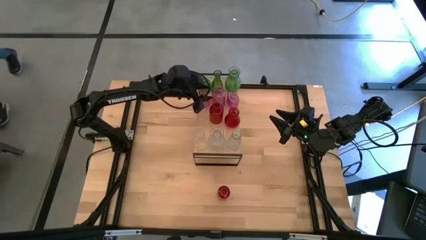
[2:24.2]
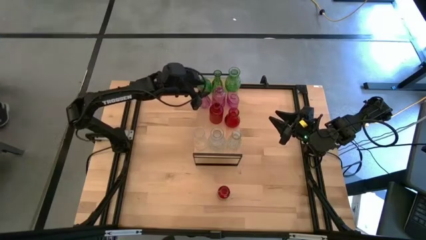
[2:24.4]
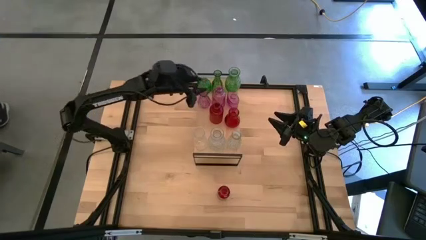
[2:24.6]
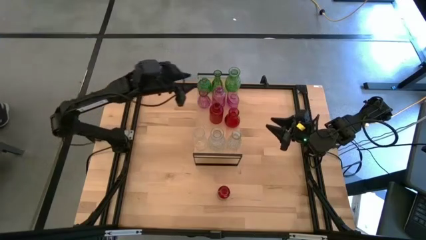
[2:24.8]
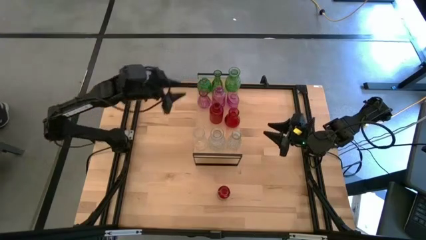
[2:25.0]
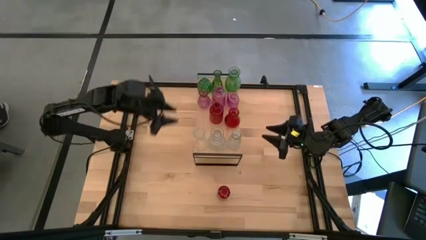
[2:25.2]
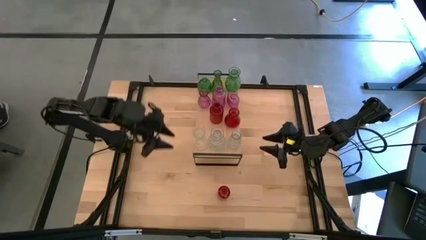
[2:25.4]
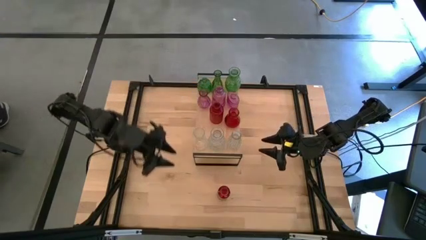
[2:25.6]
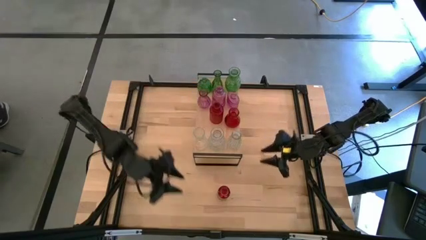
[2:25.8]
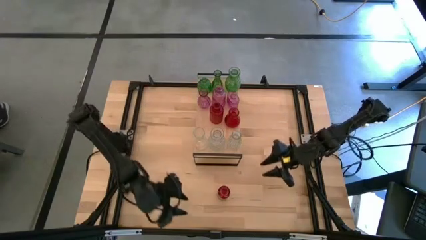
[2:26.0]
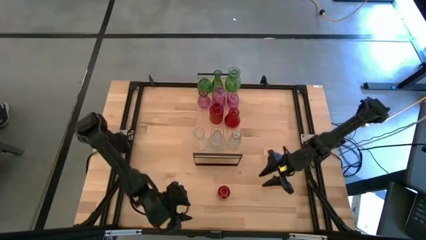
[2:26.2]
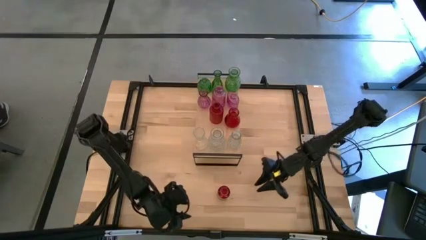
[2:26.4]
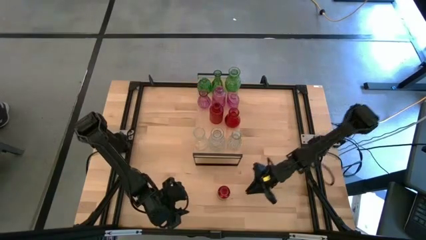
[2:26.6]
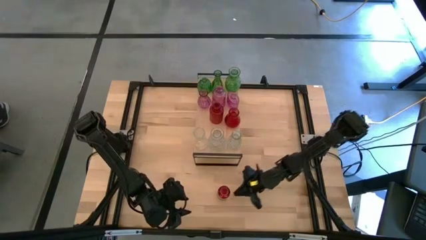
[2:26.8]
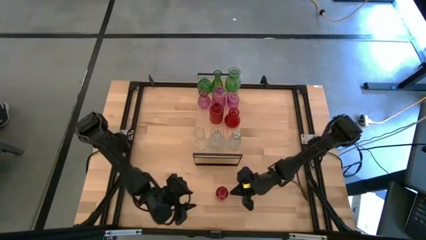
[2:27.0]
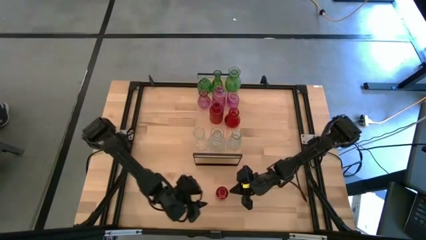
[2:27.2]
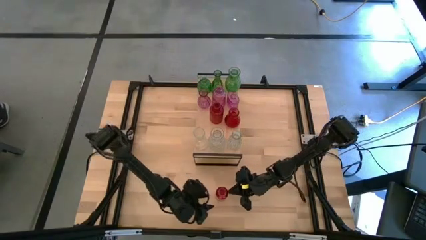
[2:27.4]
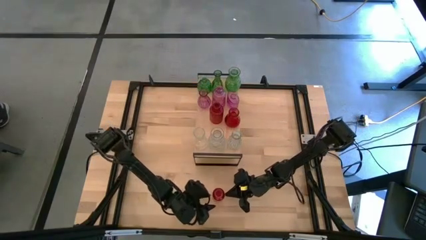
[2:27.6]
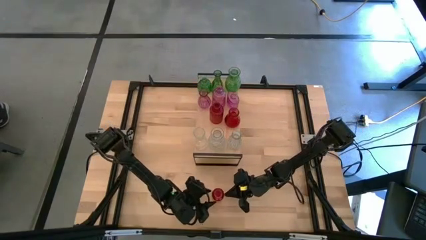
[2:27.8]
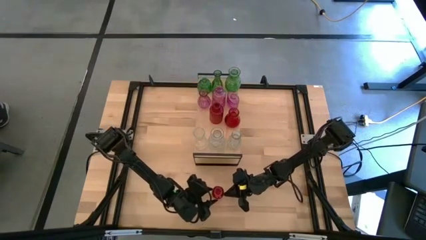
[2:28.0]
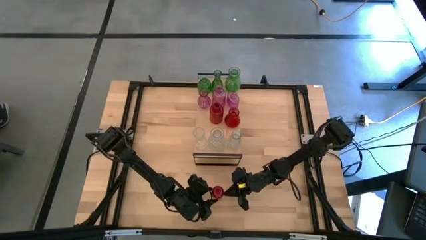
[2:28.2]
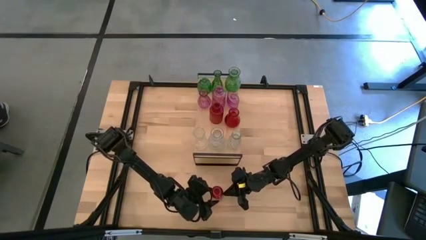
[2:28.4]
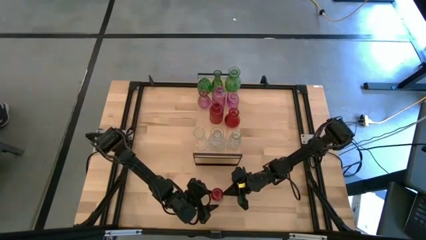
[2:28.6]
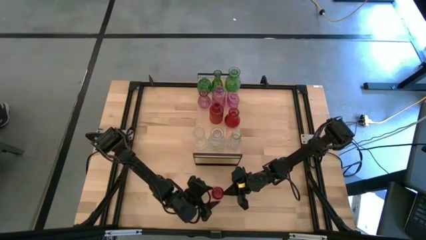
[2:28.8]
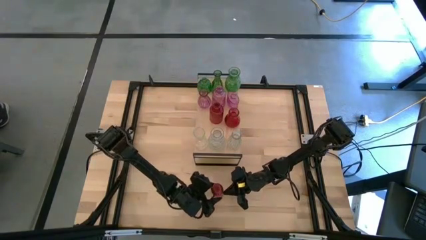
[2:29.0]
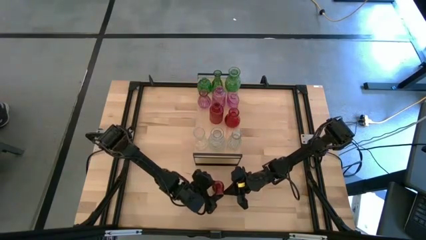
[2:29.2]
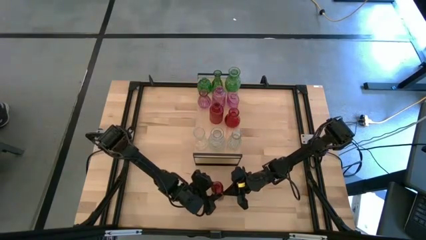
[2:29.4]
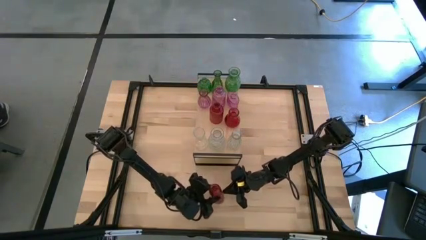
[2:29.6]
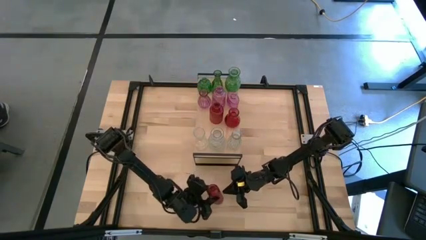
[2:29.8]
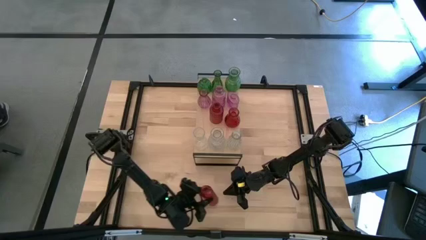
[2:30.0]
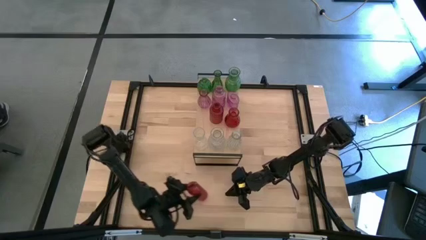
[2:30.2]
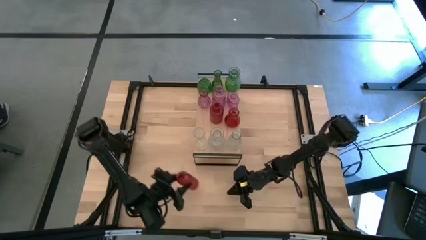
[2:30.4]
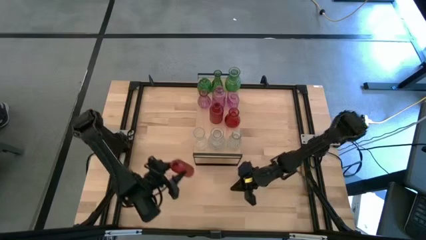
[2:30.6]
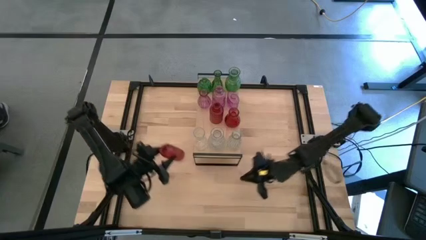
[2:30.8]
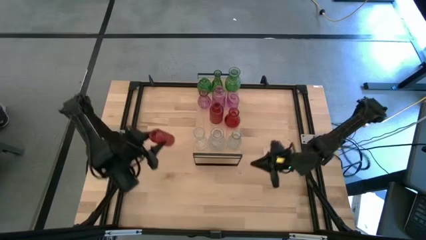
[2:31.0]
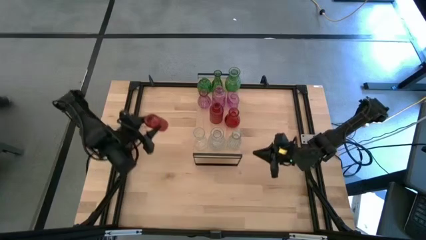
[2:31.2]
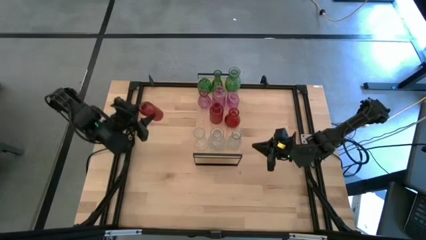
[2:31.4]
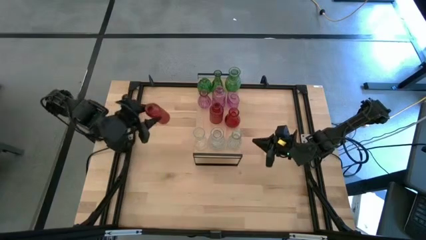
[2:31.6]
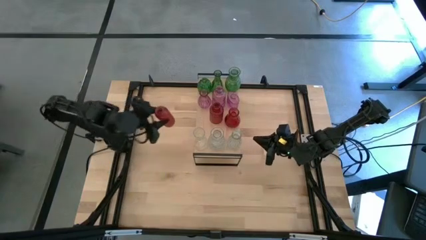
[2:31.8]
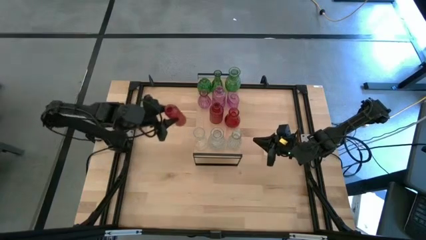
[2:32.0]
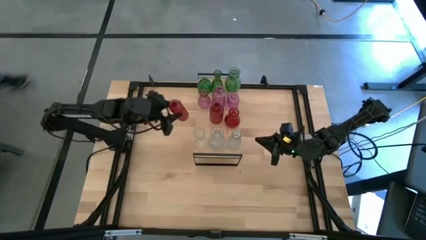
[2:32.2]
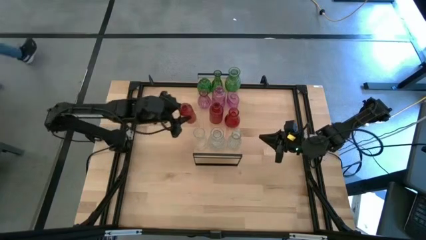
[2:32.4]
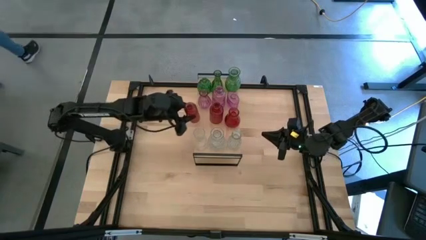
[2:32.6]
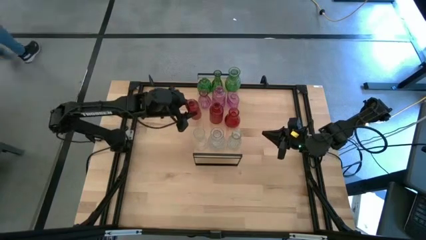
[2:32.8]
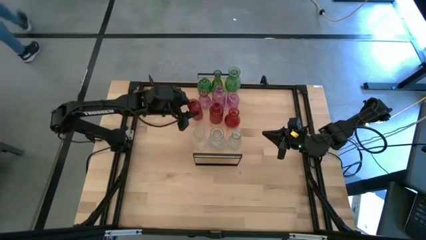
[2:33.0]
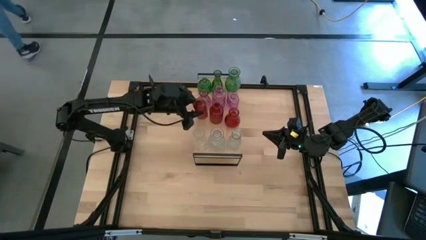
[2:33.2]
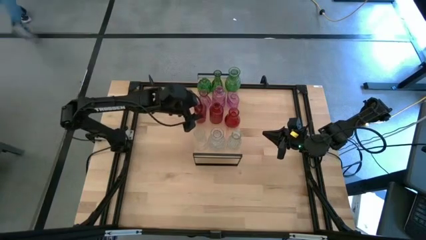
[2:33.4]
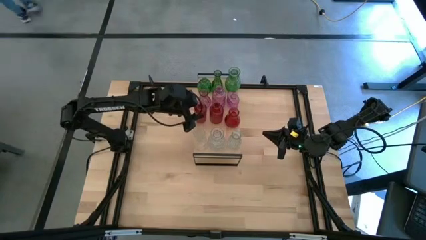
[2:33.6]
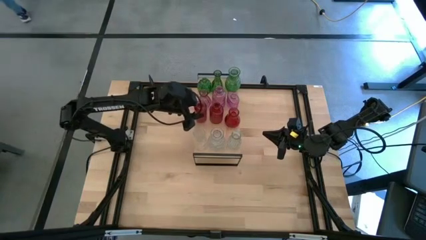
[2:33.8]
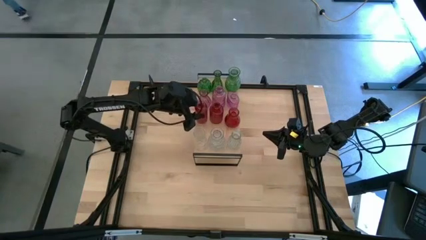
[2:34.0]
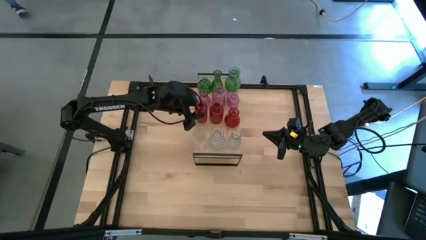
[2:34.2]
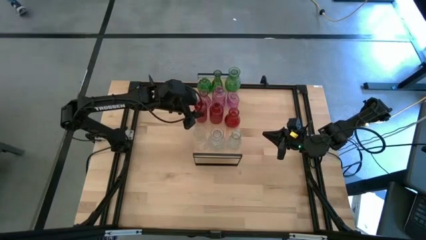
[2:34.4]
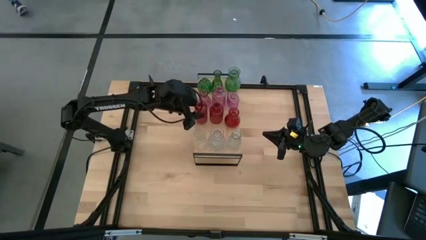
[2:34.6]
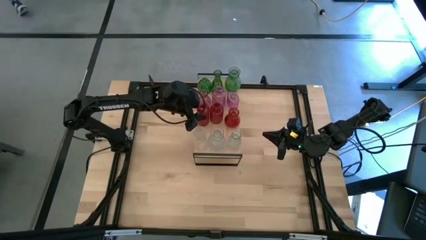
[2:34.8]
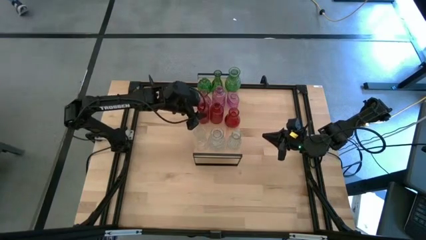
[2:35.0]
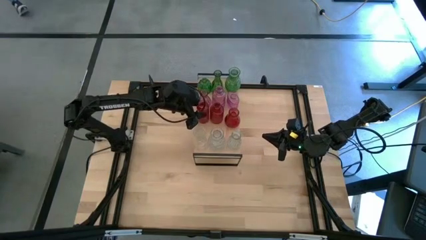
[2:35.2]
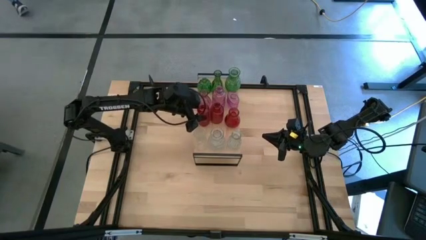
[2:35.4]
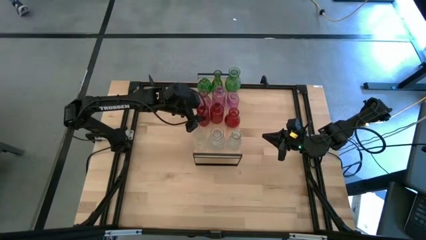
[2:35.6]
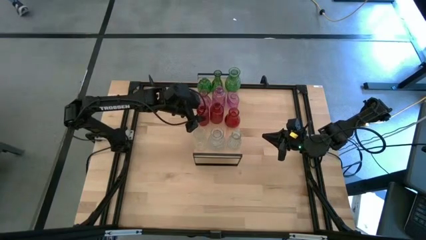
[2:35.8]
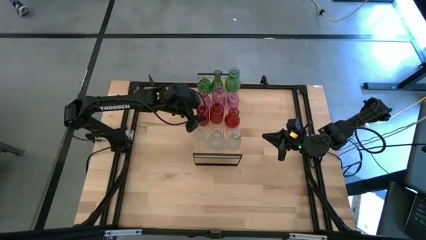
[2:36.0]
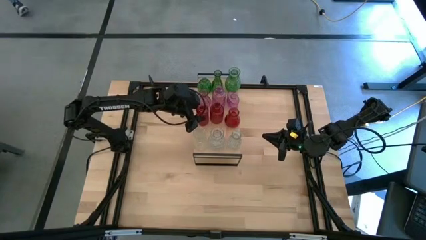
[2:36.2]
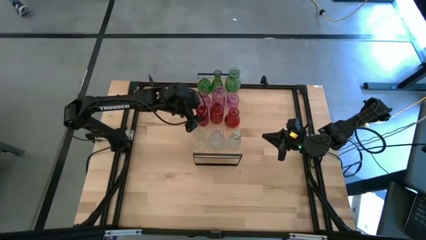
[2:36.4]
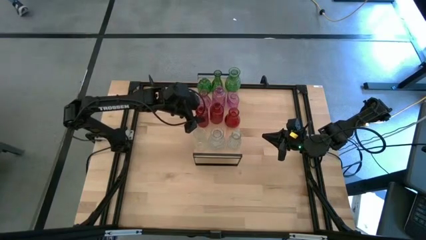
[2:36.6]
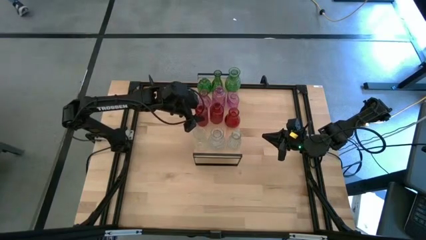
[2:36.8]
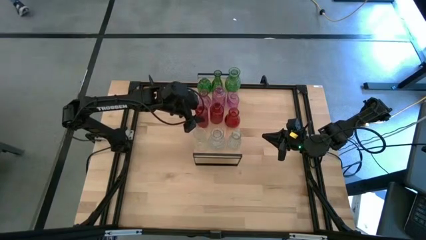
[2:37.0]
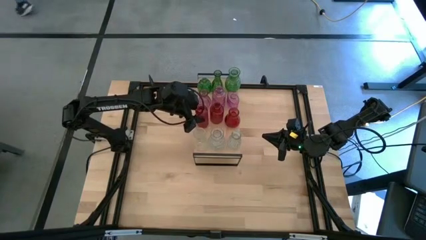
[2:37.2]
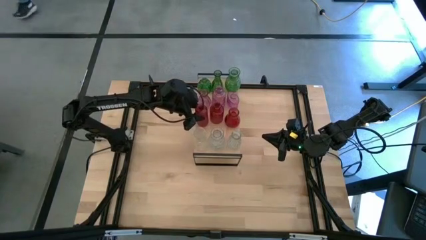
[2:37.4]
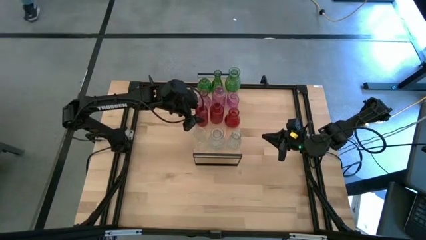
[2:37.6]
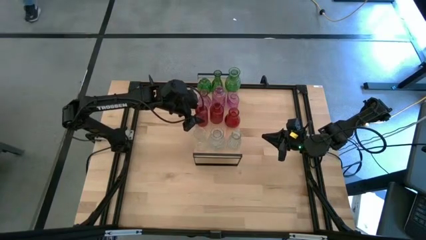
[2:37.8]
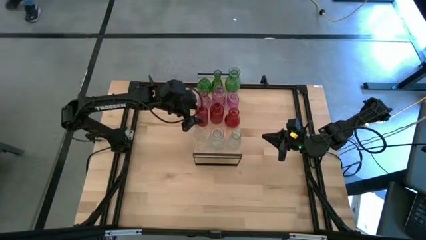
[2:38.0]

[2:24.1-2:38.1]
Task: sort vases onto shelf
Put the red vase on the shelf aligned with the other red vases

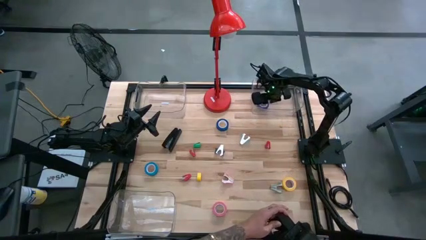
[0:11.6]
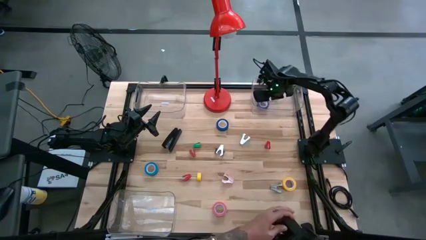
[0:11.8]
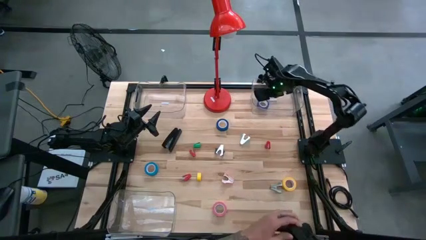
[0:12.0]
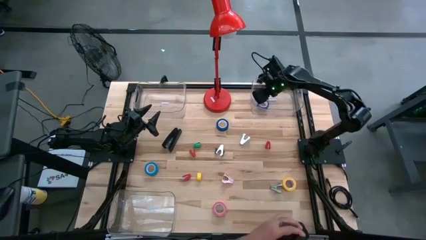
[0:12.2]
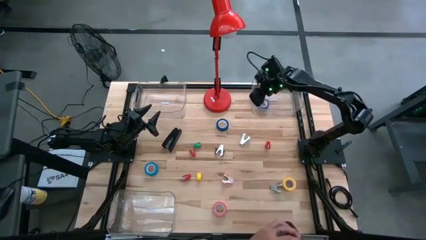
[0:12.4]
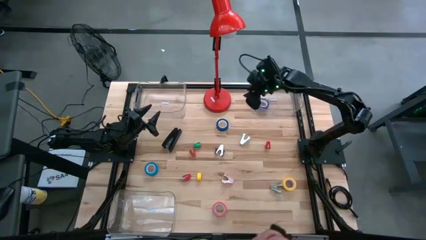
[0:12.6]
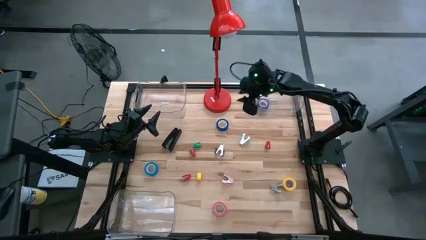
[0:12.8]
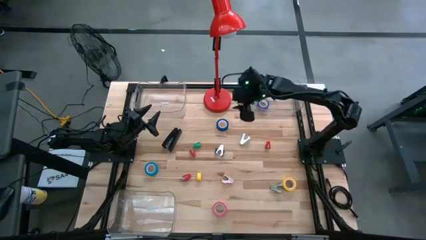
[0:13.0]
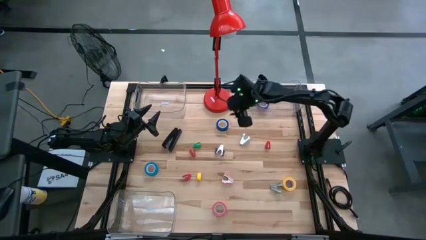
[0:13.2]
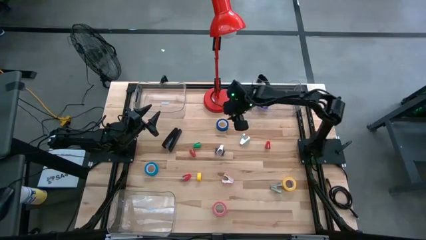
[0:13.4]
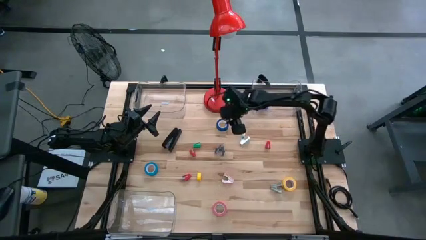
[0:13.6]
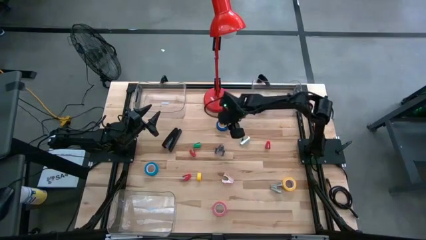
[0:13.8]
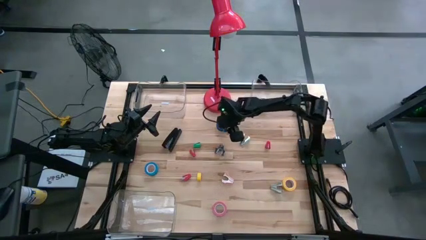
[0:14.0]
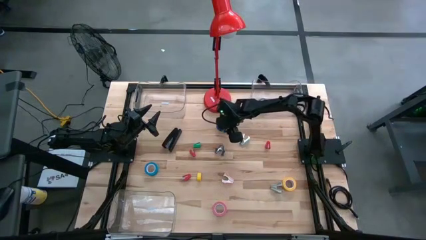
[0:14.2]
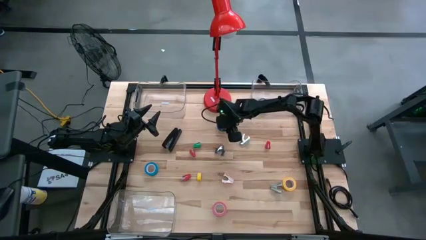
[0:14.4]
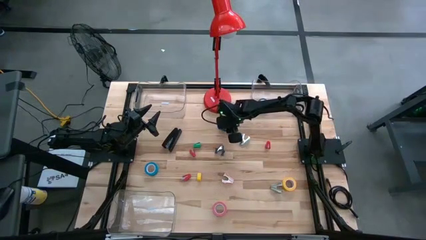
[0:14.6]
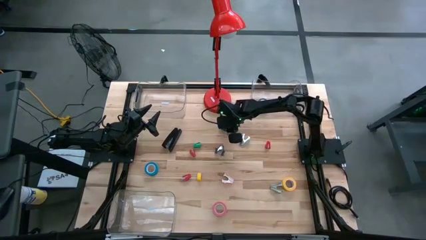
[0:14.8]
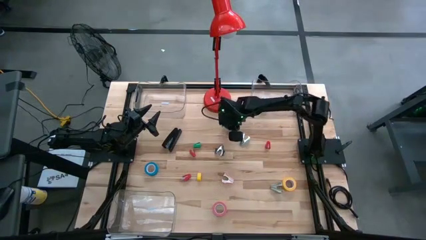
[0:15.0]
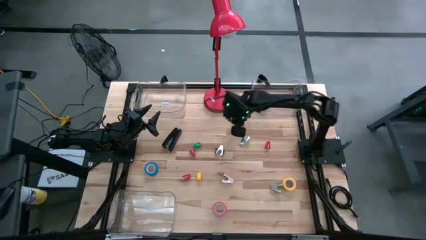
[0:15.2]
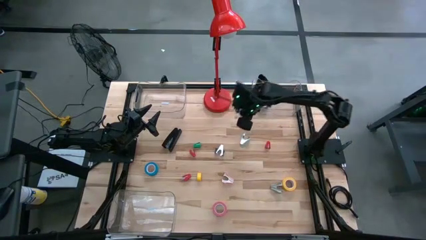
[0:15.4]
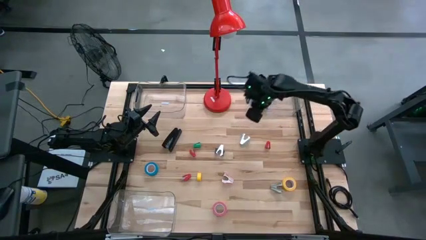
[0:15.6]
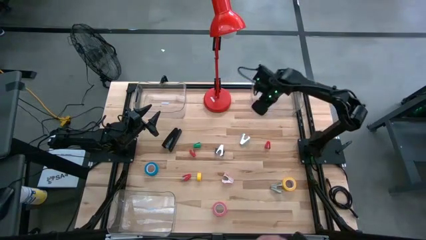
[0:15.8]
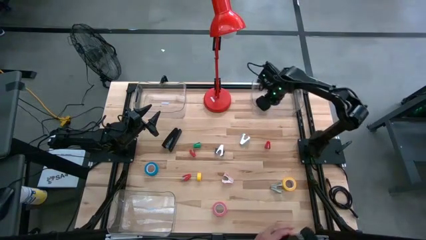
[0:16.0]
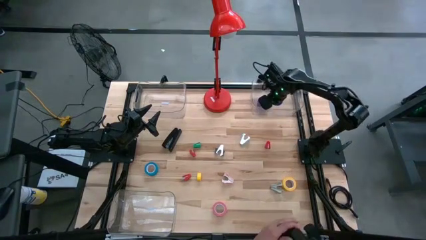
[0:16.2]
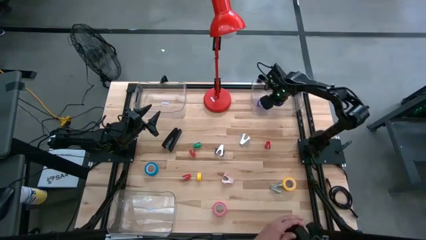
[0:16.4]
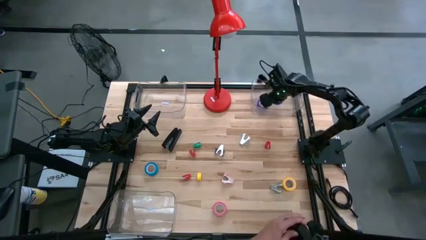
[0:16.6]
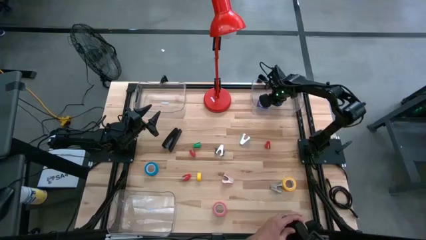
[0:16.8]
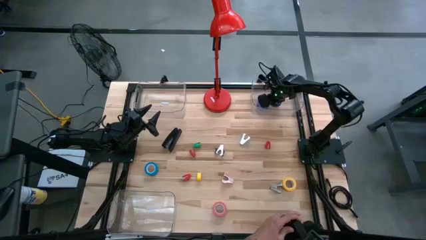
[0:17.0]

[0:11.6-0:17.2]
Task: Pick and place Stapler, Stapler remover, tape
Put the blue tape into the top right transparent bin
